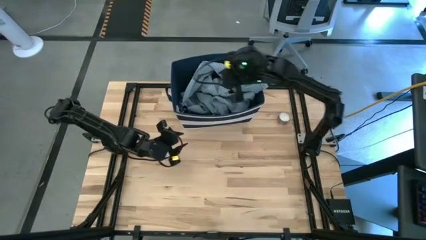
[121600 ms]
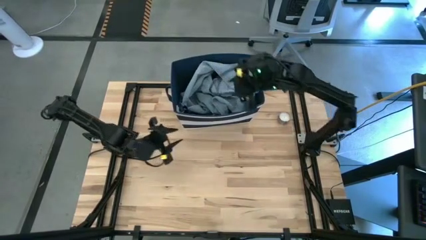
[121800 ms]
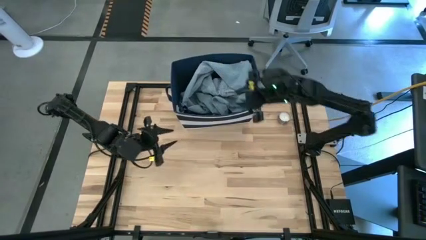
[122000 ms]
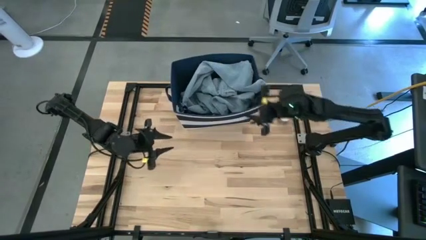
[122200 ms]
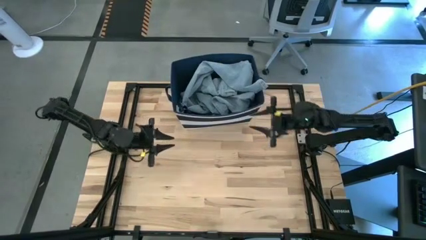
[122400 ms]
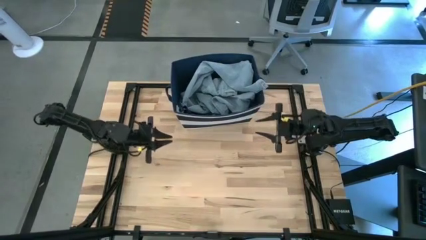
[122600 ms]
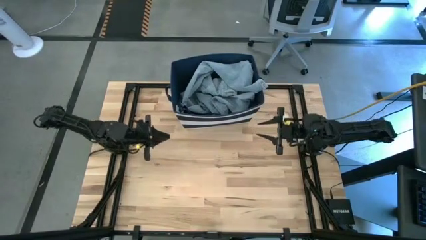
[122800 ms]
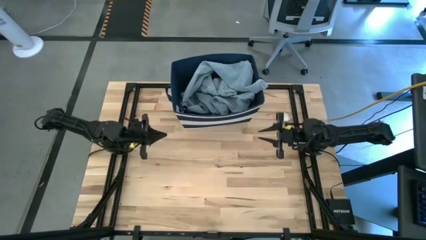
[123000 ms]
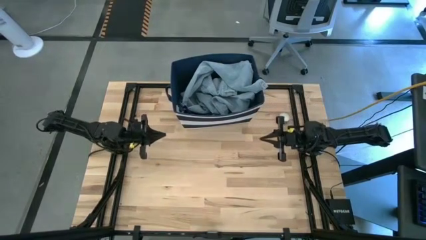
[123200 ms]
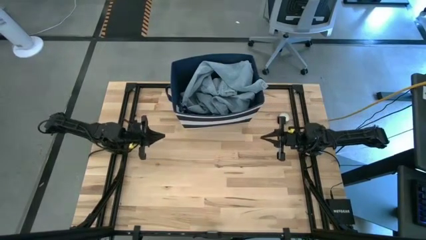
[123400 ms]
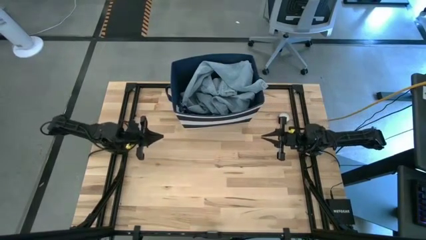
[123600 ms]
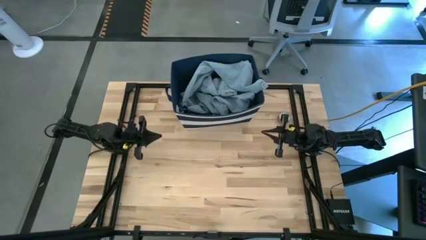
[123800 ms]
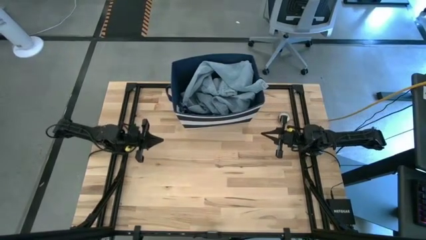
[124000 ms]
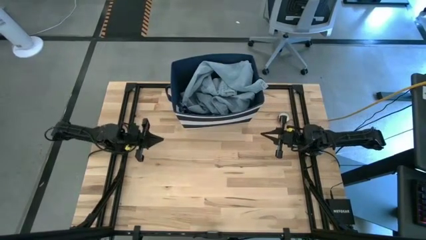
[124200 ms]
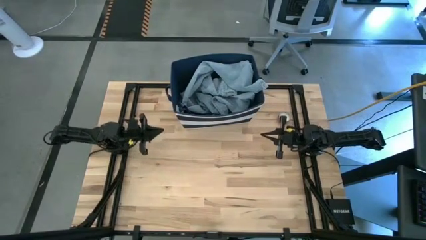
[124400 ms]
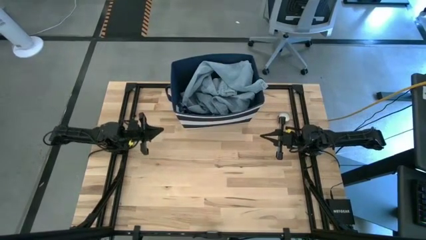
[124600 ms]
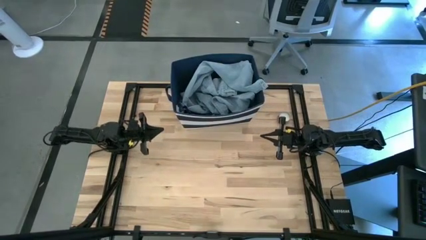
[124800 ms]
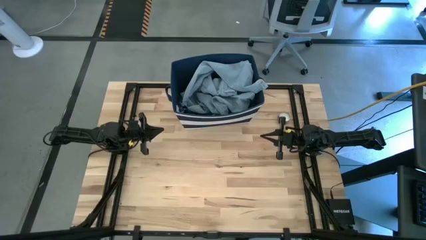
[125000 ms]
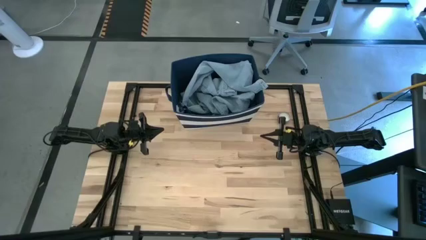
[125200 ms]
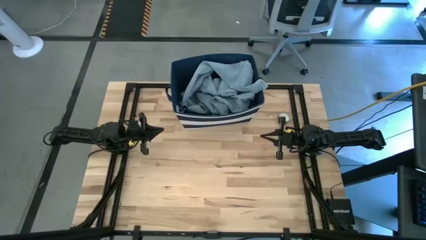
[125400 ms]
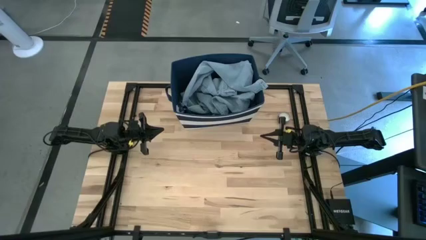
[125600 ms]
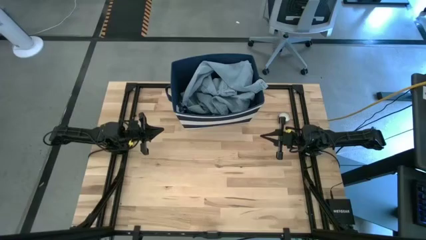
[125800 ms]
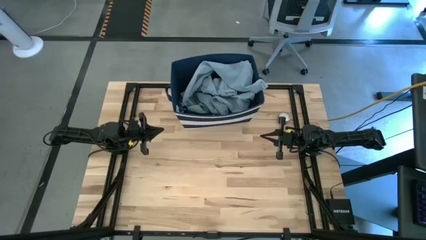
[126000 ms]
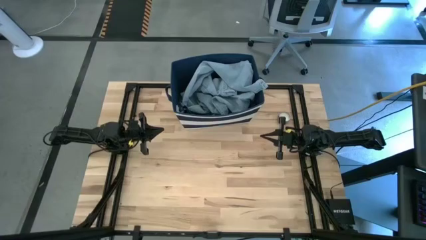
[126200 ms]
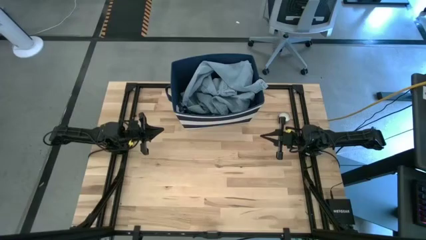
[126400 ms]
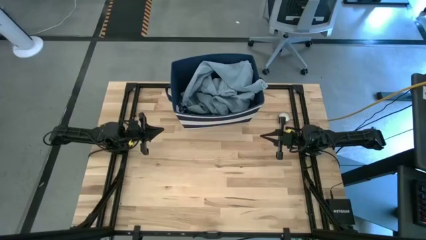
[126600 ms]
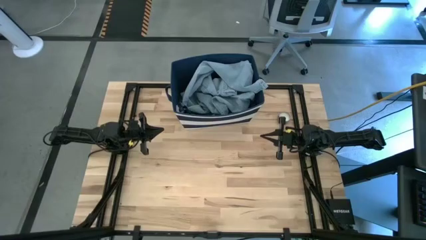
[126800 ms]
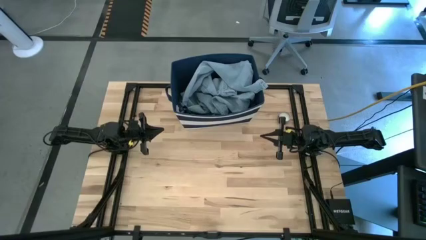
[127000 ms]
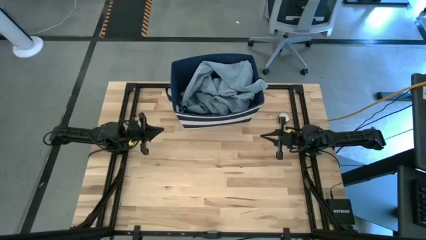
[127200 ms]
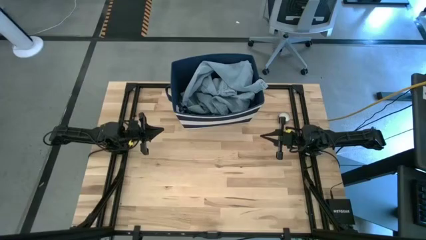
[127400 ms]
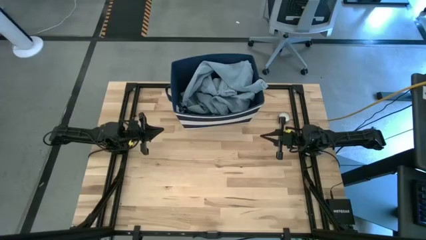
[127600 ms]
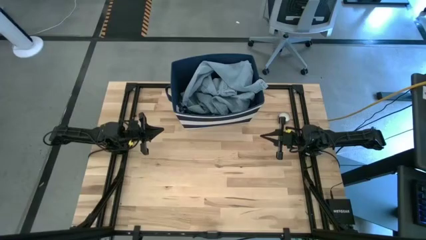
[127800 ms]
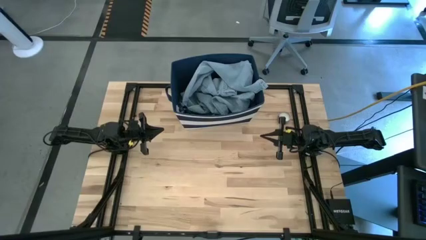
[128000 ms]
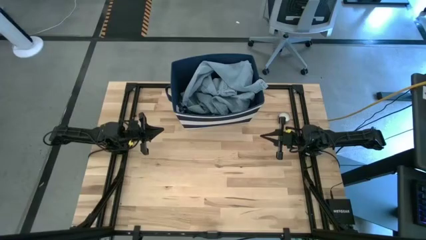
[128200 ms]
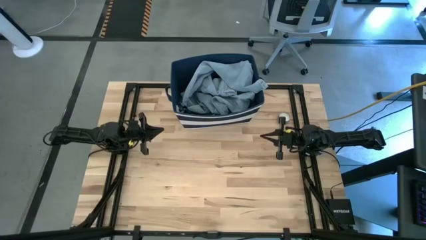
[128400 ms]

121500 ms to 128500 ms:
Task: Sort clothes
Return to Home Position

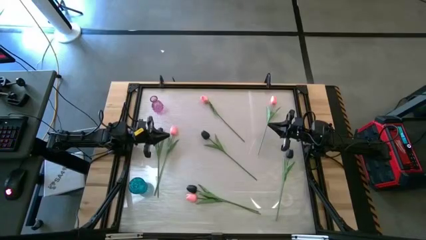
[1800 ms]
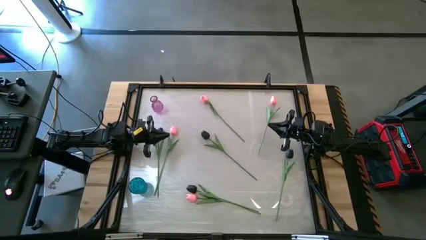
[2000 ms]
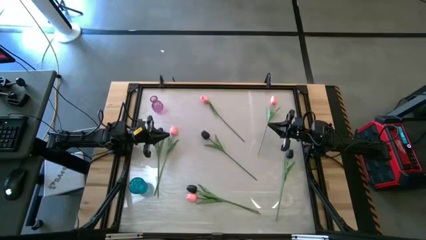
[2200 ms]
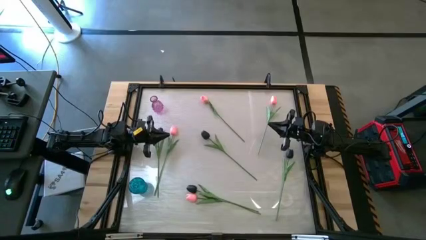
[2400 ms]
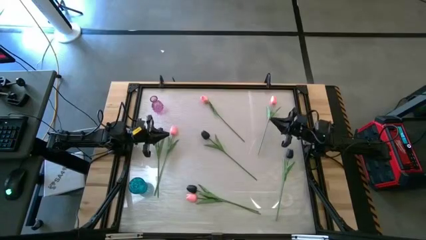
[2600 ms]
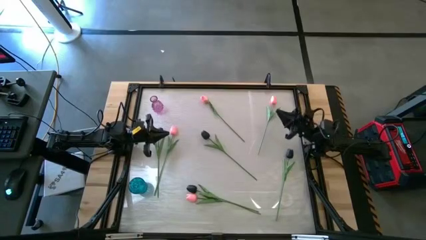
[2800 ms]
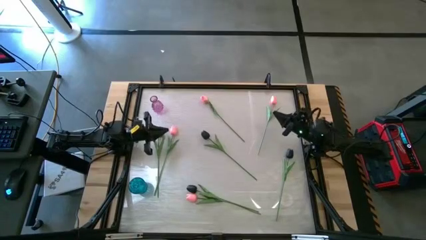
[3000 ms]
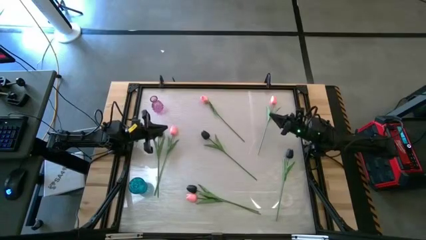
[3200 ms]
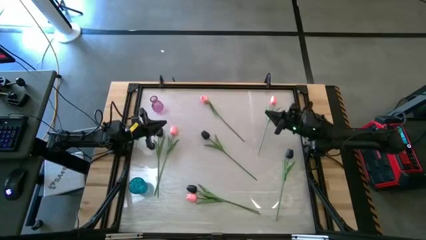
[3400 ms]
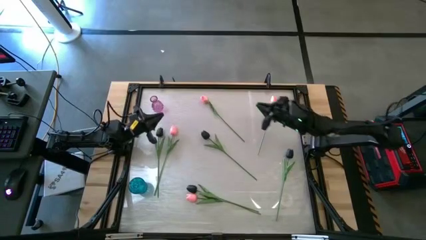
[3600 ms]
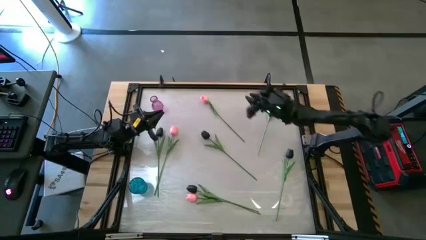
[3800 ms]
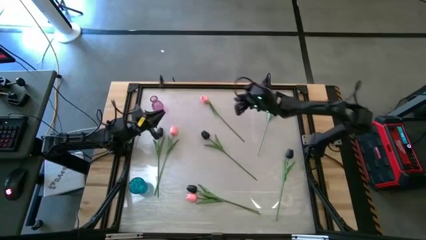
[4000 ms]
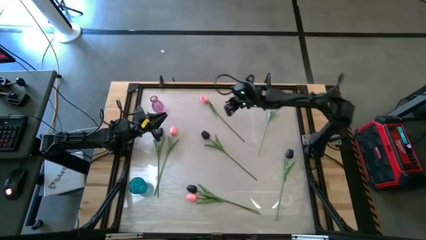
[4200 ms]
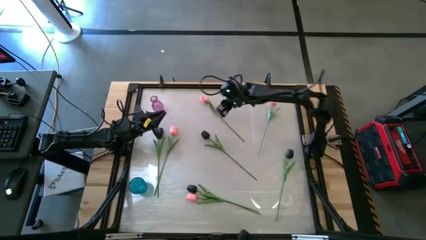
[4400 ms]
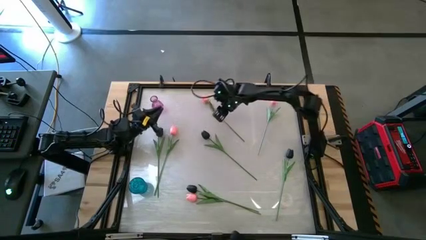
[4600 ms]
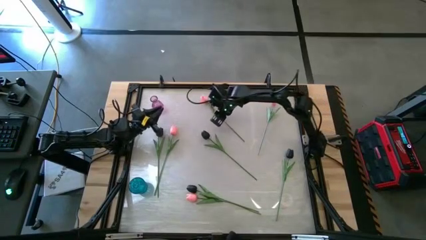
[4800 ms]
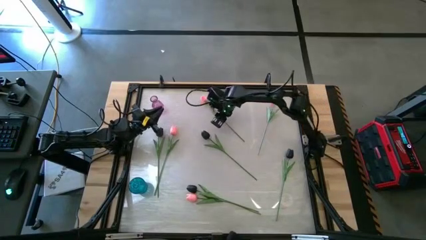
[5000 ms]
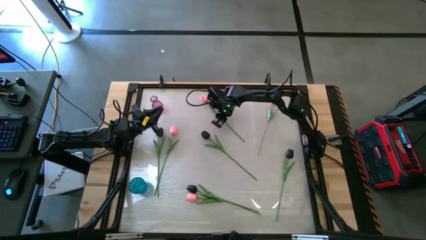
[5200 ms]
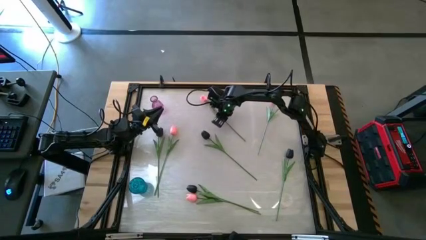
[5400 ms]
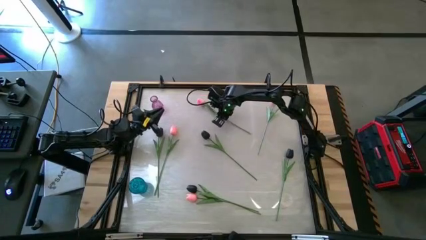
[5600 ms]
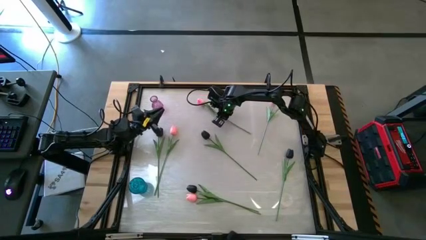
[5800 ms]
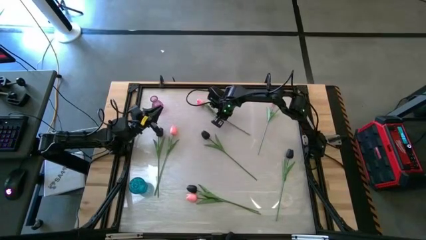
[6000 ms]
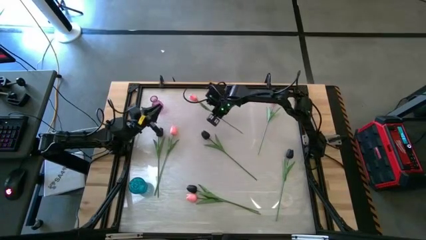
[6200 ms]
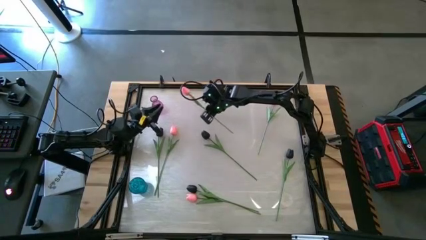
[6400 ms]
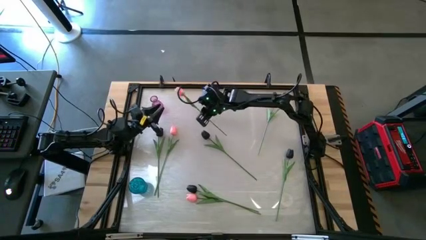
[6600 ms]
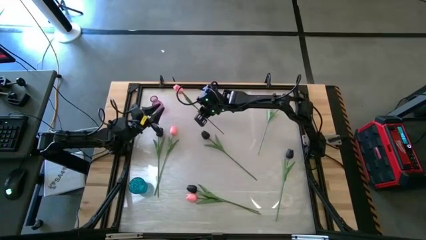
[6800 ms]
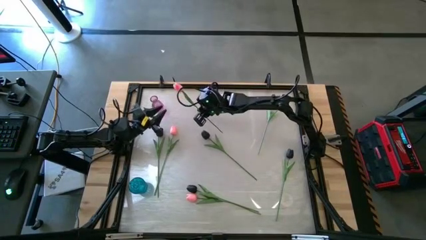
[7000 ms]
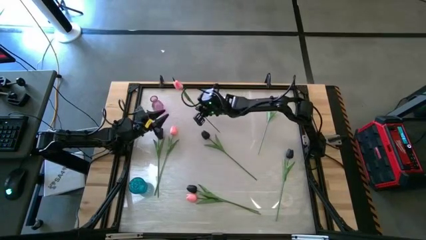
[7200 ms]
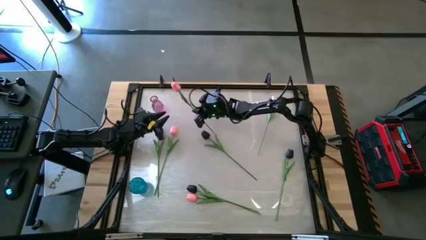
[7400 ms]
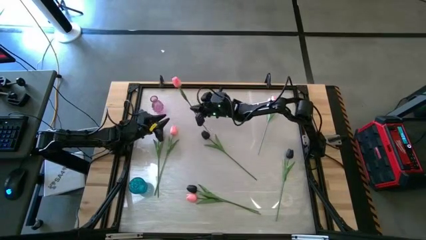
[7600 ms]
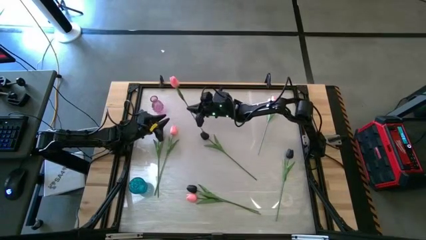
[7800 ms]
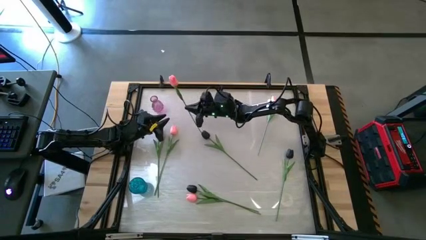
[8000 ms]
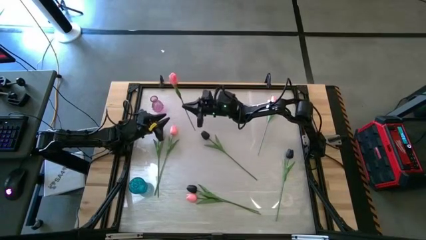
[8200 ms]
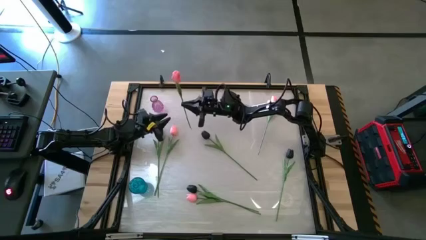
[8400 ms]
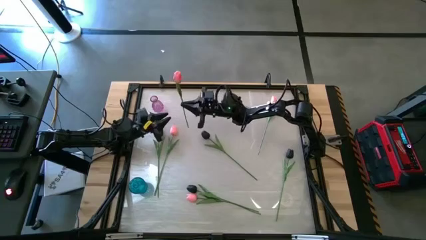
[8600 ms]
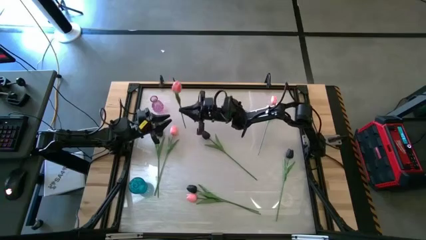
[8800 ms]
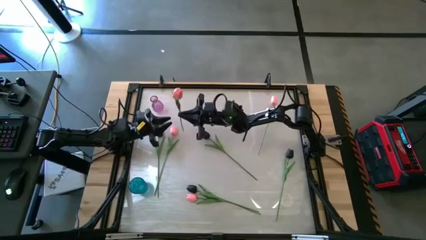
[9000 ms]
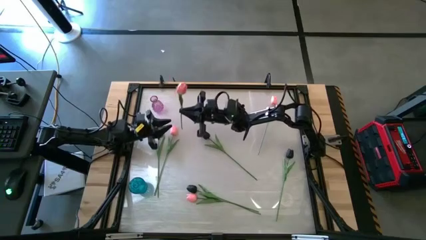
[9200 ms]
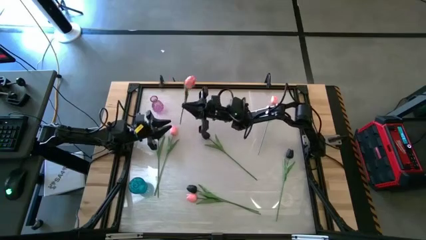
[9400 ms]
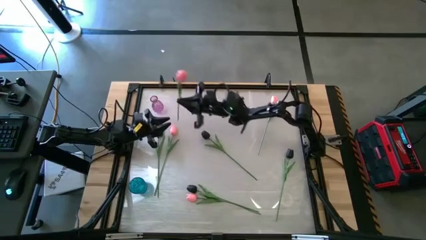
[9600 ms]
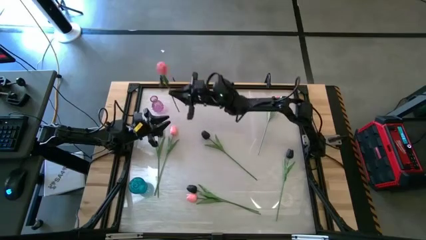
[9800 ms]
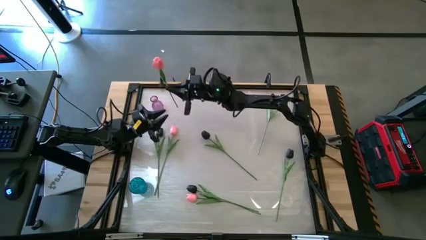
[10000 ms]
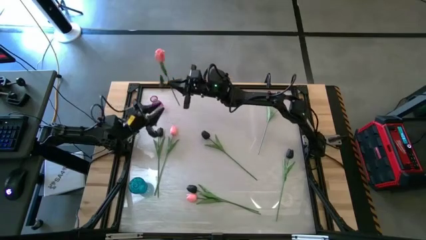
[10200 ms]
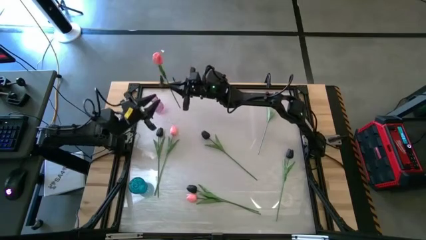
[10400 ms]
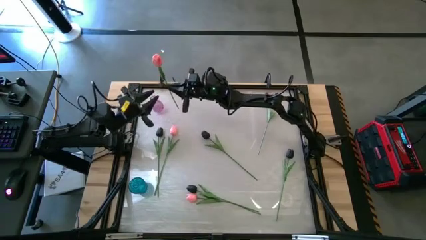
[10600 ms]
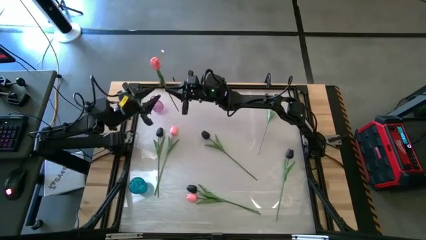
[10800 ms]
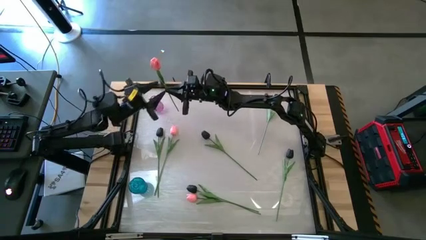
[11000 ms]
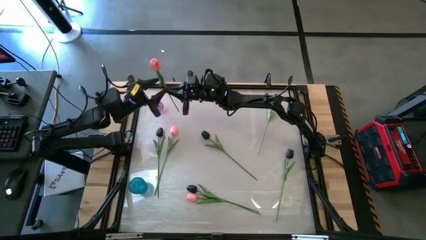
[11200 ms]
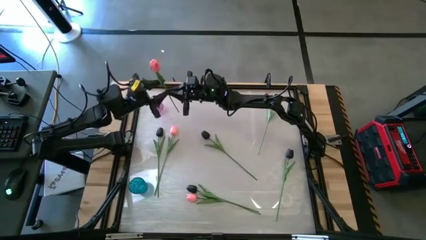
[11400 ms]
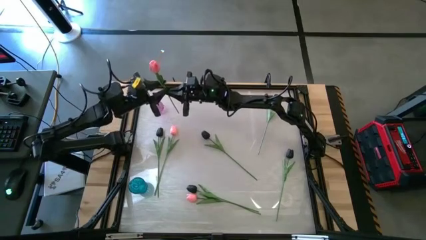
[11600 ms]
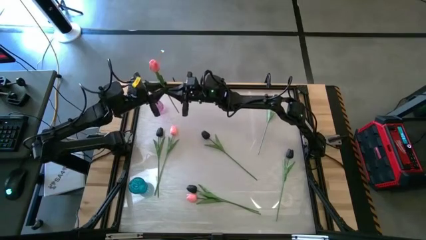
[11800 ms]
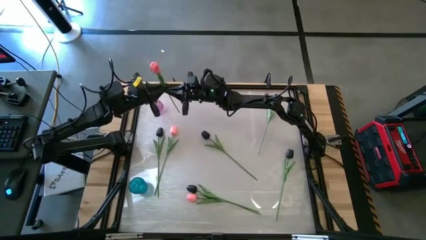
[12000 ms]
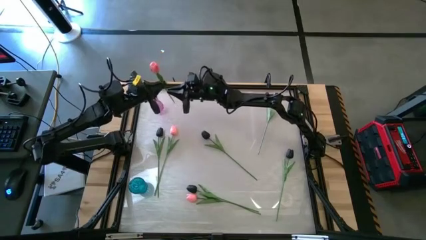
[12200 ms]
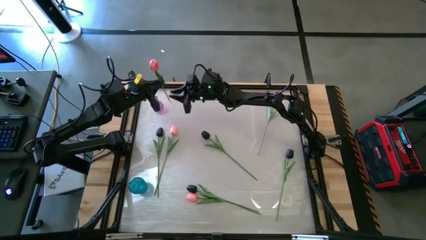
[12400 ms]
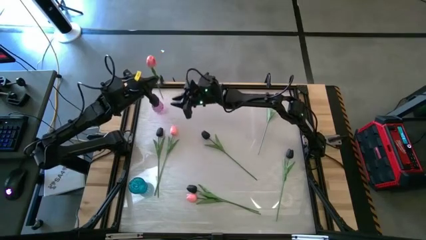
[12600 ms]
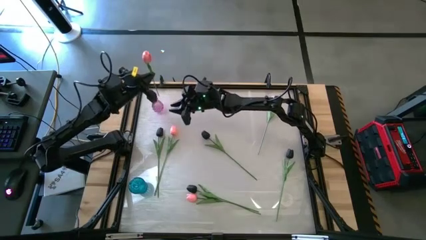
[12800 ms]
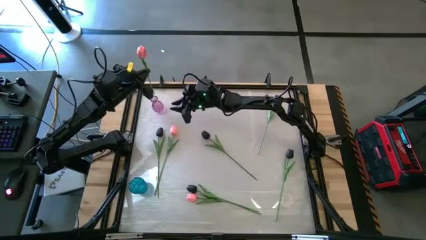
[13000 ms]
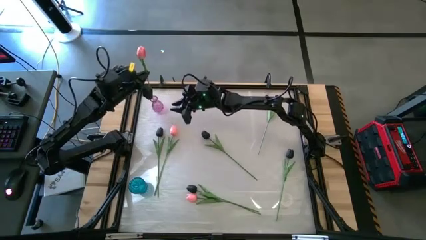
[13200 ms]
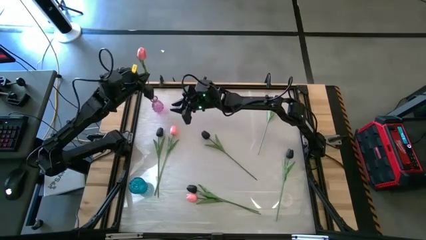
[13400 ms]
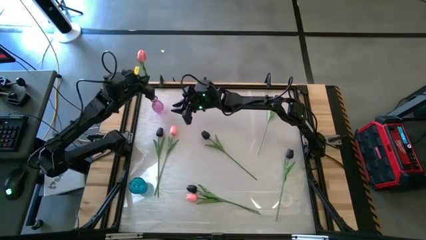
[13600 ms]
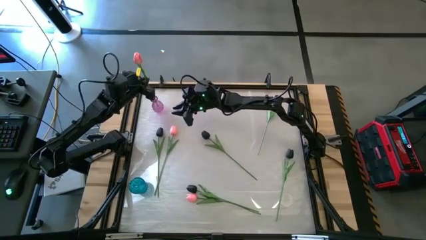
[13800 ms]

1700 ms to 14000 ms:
Task: Sort flowers into vase by color
Put the pink flower into the purple vase
